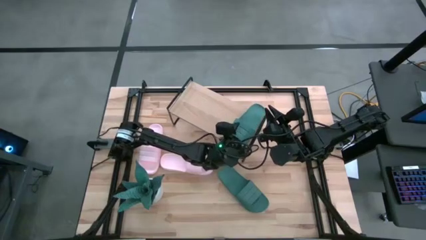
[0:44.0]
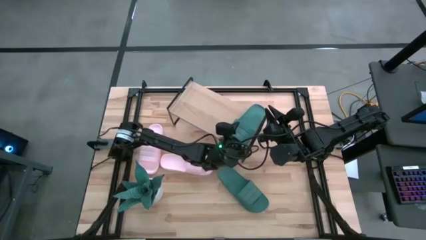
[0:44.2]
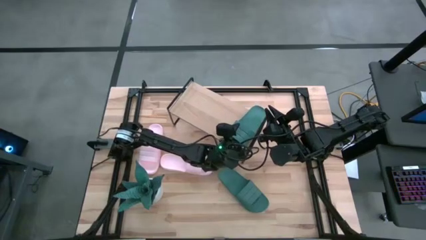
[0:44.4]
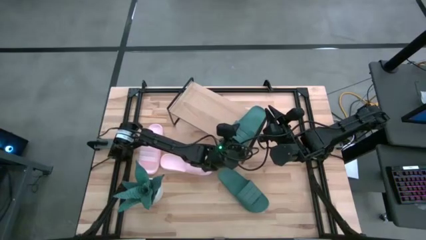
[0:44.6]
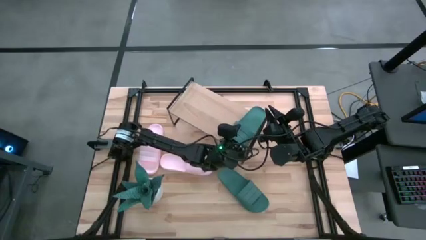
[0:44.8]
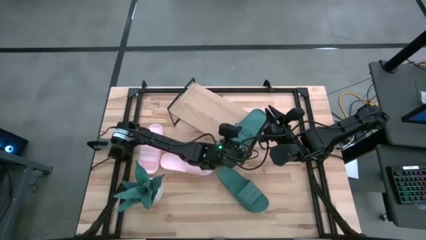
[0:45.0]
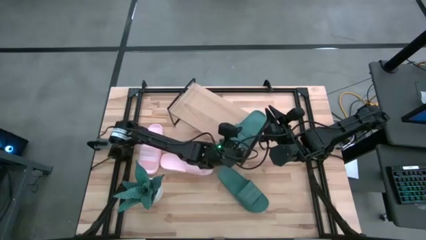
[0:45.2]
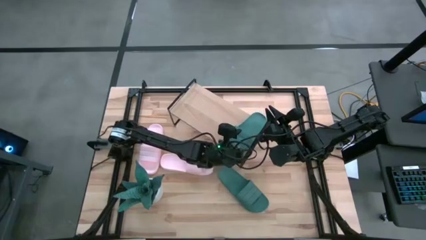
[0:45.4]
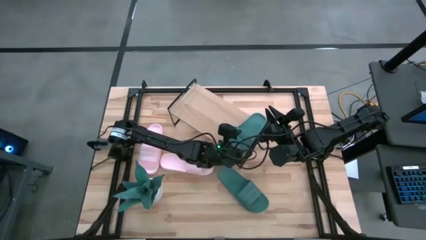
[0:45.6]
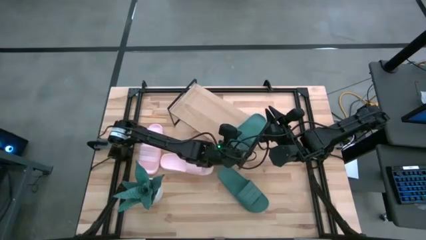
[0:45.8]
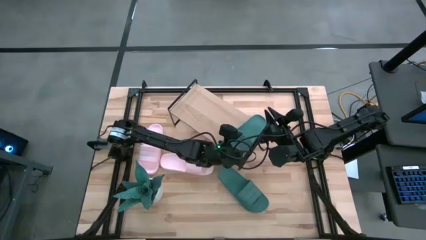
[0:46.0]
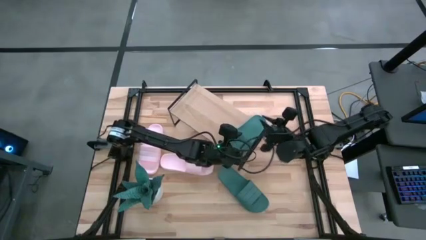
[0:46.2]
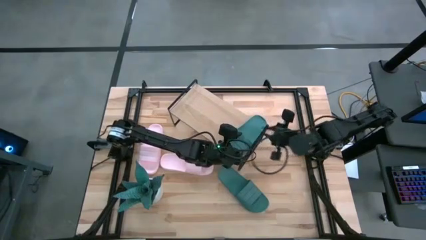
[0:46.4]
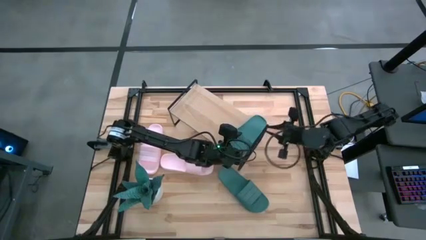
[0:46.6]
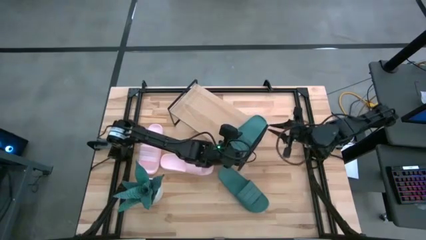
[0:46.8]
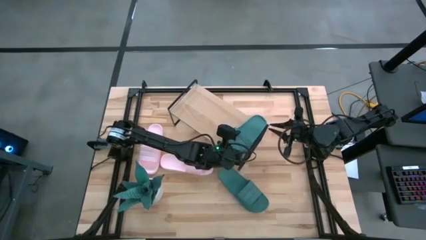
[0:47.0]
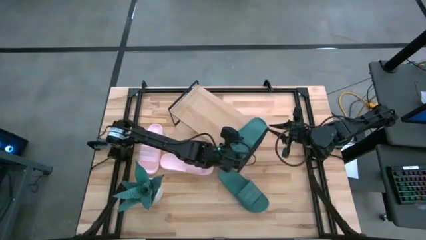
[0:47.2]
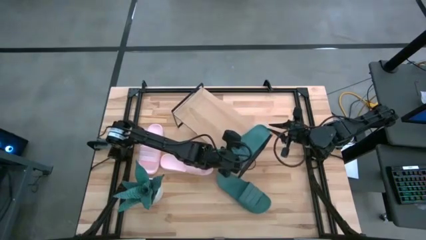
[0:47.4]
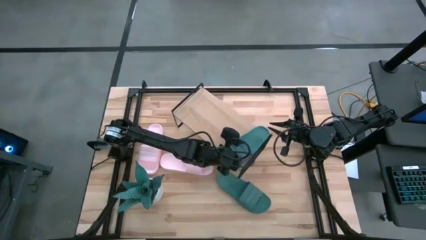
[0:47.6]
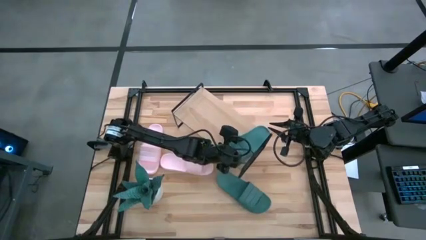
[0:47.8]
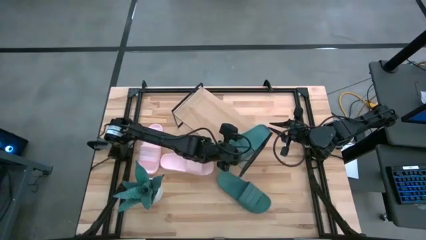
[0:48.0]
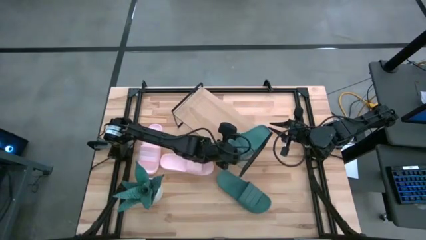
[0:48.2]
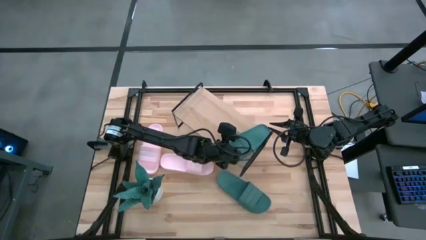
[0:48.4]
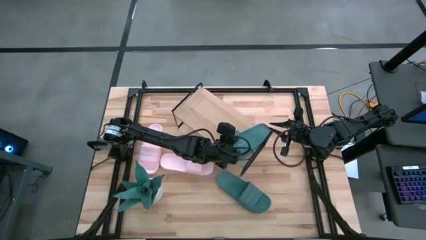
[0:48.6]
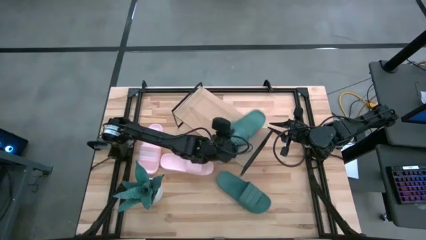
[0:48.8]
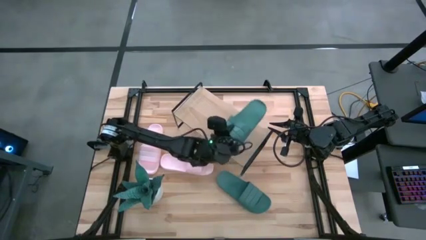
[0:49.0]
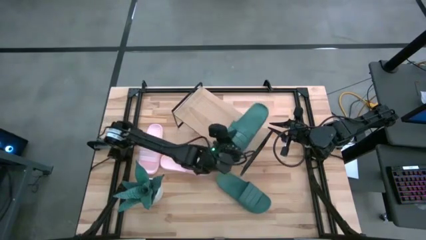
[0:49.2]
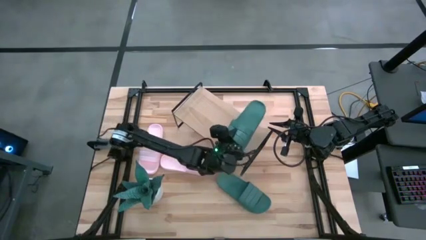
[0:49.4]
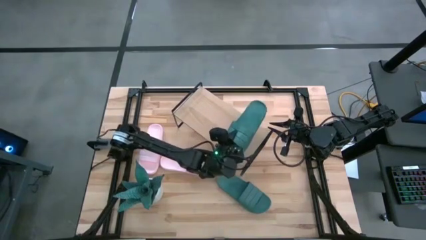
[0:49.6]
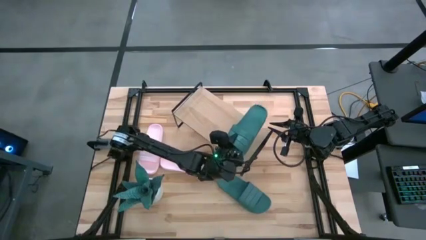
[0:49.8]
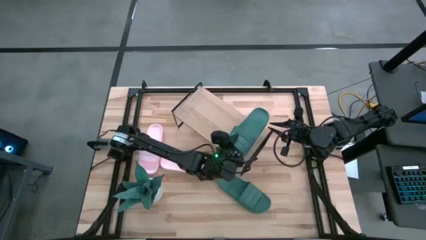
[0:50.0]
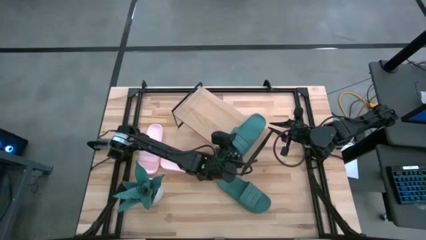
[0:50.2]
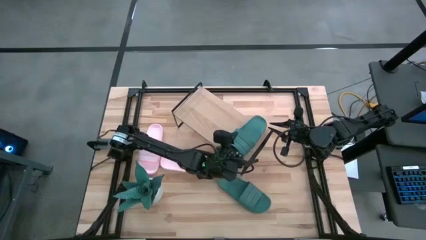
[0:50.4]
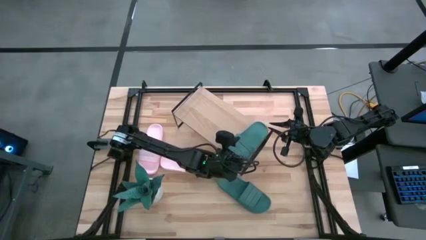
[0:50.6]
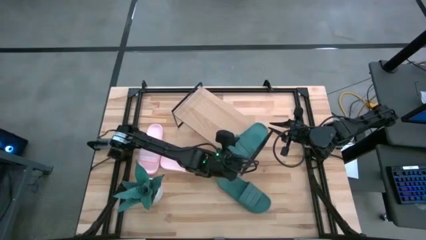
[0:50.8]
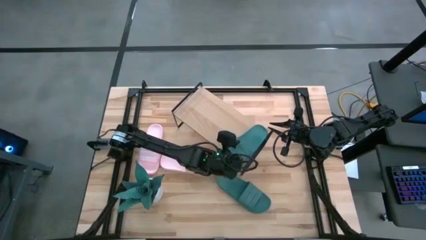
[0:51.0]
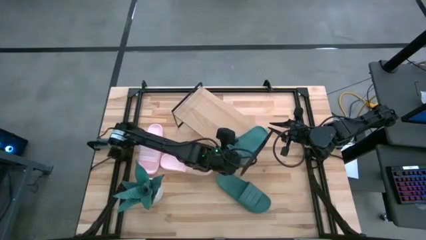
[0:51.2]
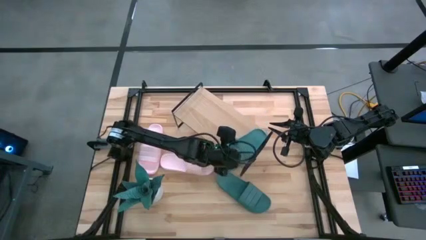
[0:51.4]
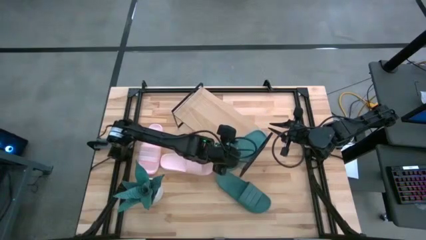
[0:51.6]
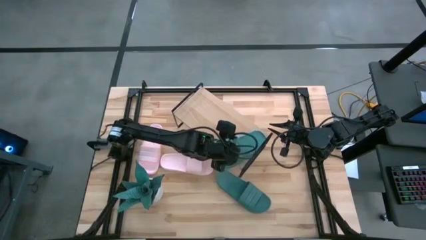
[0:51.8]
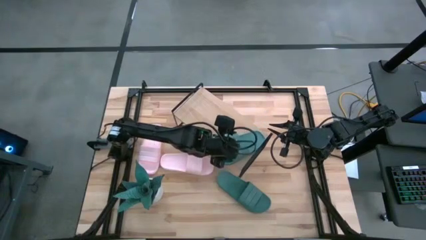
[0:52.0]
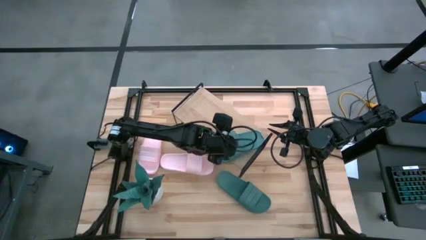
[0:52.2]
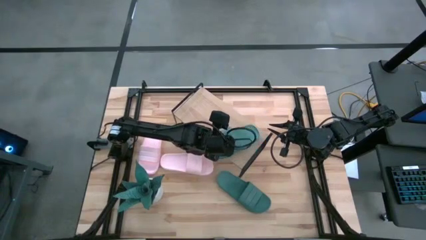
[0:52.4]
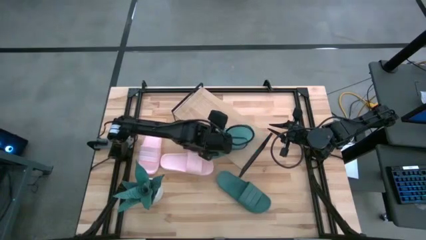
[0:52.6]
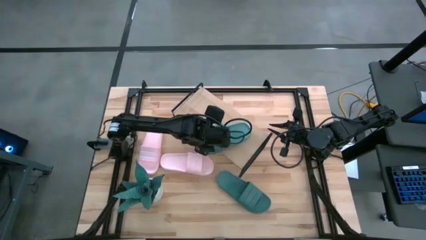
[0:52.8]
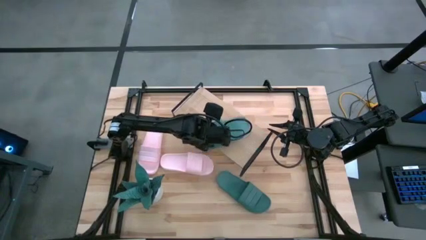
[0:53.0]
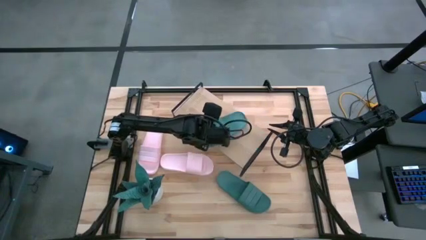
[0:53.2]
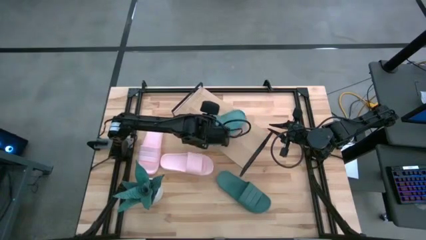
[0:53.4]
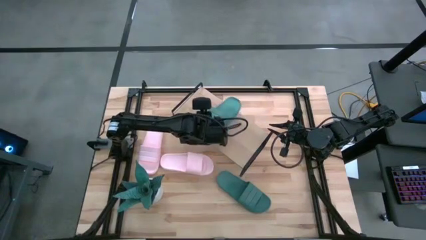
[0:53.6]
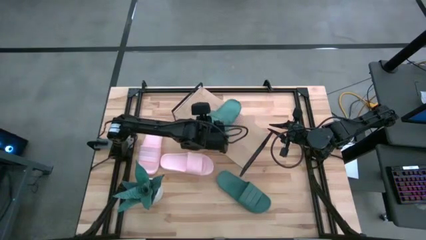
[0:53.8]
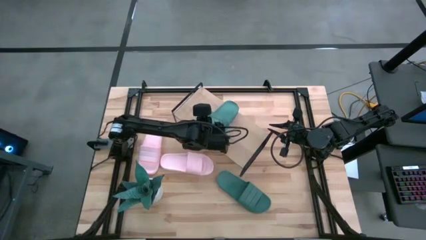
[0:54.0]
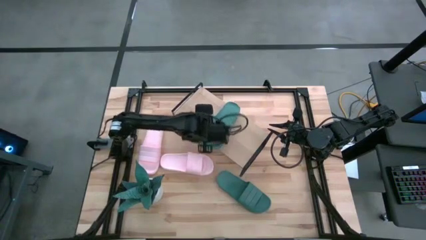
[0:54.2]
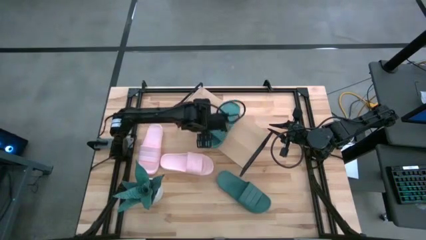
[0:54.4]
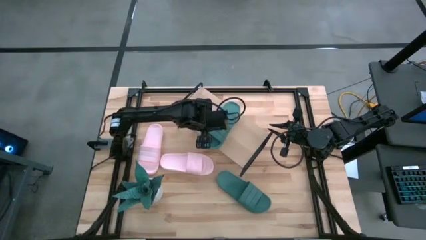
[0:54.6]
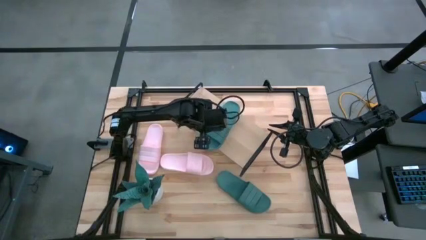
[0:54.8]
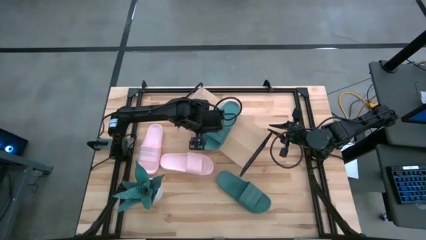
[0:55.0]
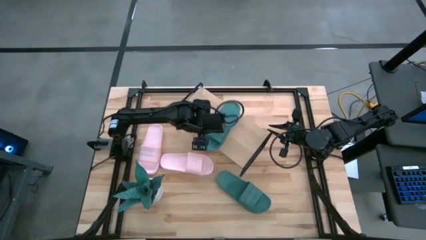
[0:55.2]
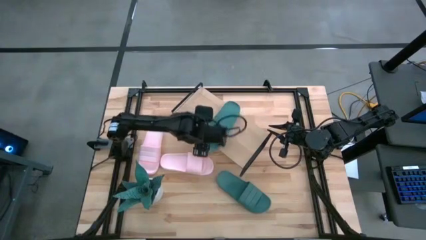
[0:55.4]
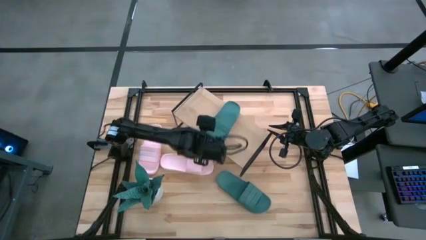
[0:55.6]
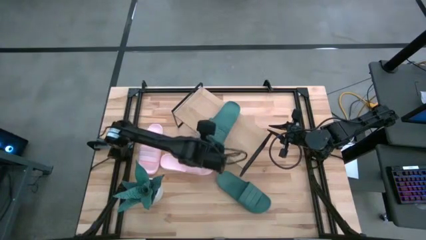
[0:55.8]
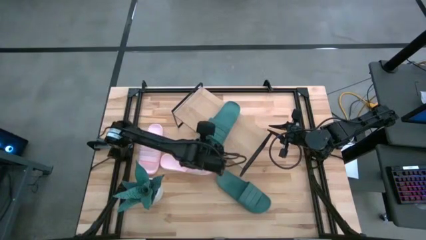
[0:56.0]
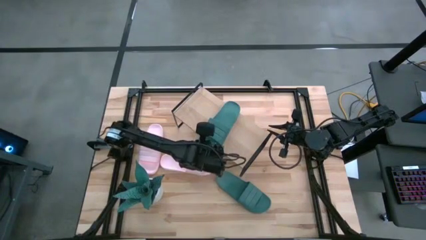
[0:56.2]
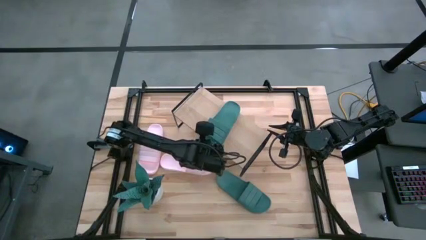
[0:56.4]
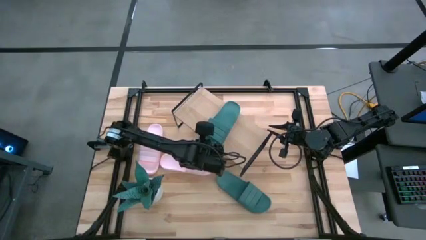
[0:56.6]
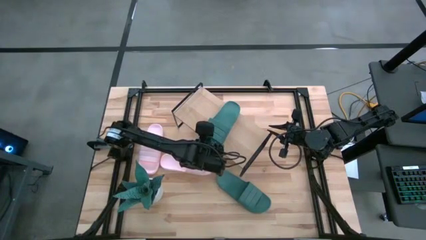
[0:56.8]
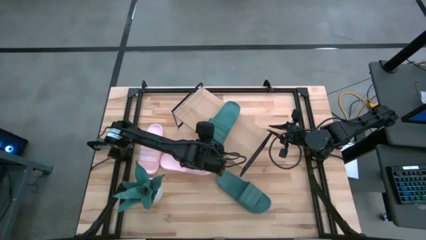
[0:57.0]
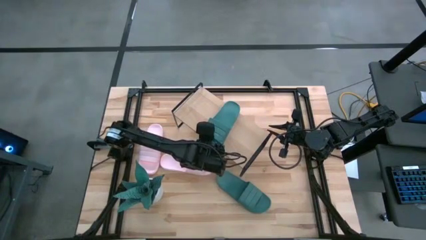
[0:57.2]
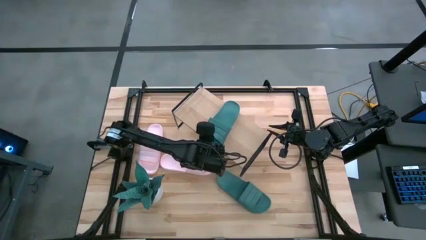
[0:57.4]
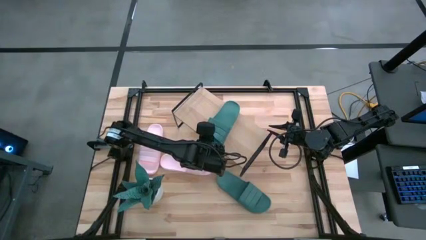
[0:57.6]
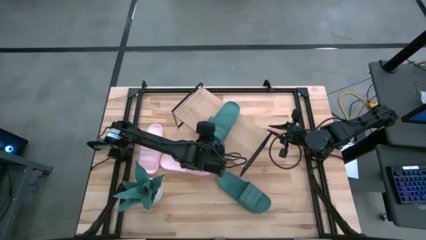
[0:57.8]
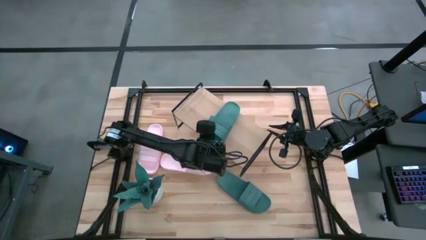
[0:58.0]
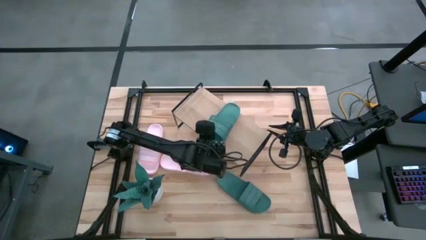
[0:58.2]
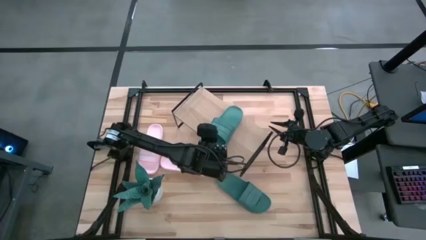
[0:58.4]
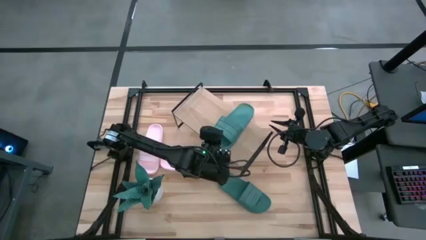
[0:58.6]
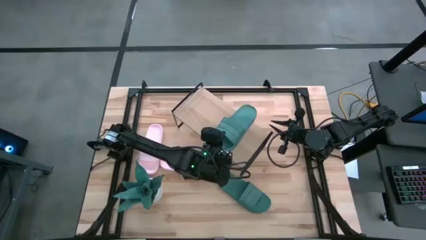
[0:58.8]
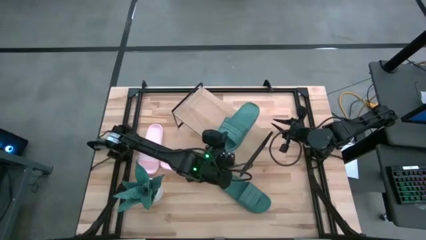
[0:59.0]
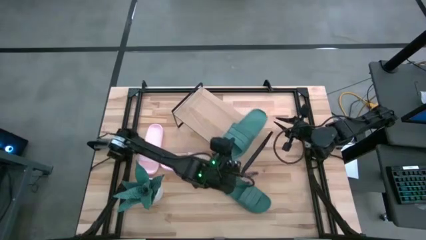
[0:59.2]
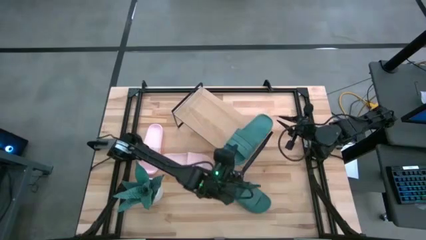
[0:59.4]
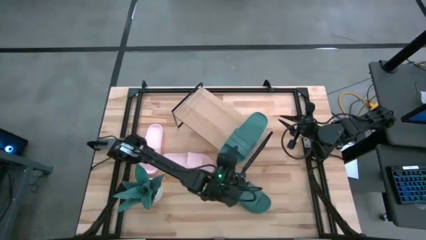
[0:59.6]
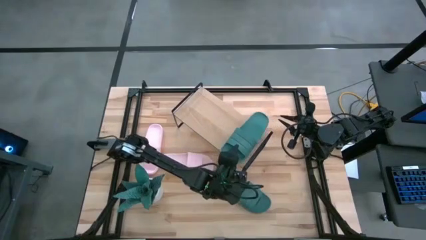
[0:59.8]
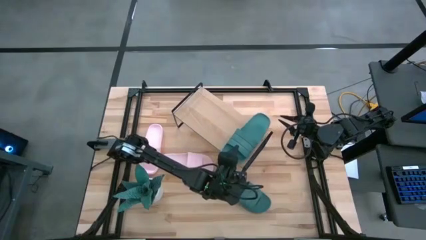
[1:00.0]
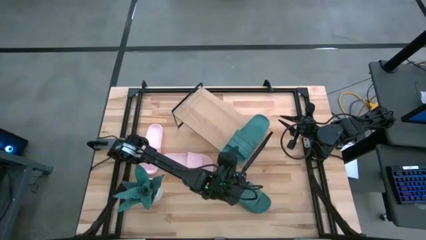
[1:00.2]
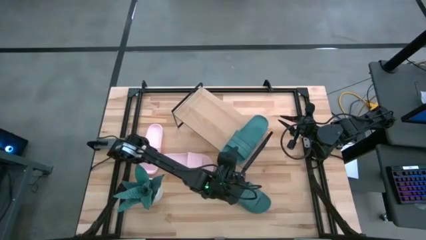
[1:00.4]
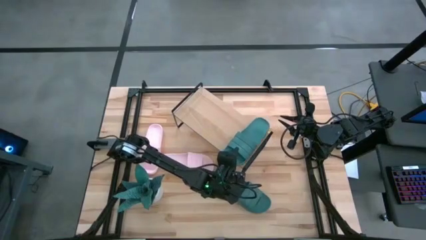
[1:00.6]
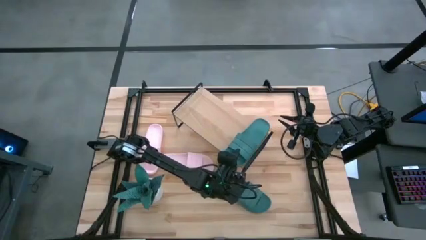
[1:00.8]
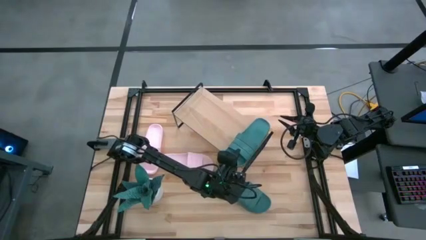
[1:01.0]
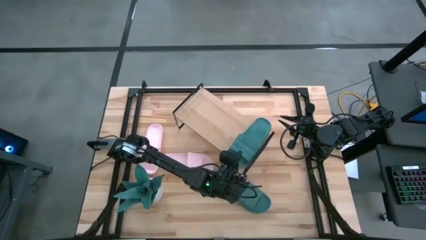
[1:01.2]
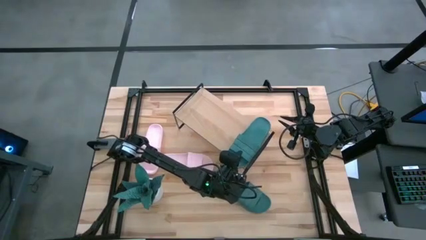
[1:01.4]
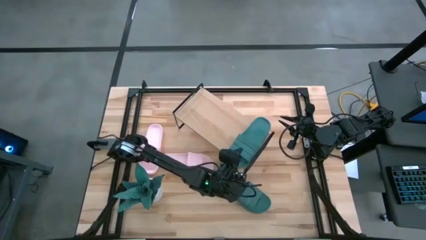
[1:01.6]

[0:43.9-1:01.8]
Task: Pick and place slides into the shelf
Put the right green slide on the shelf
